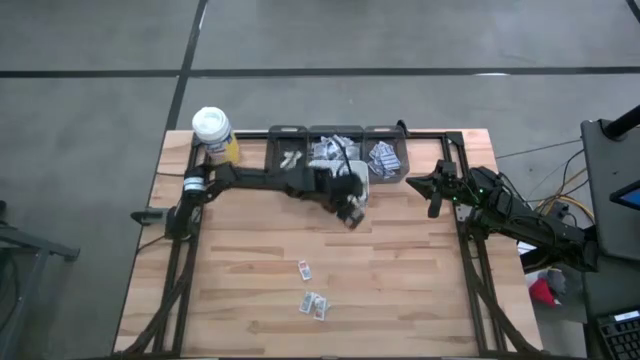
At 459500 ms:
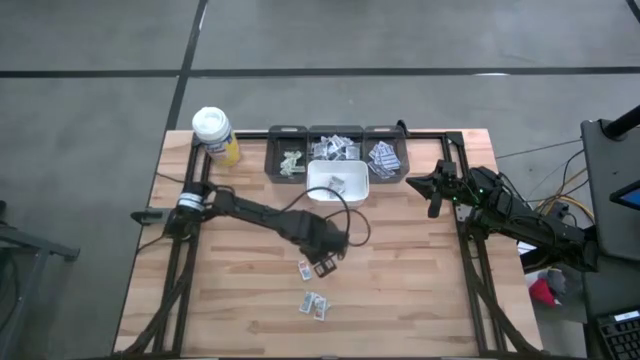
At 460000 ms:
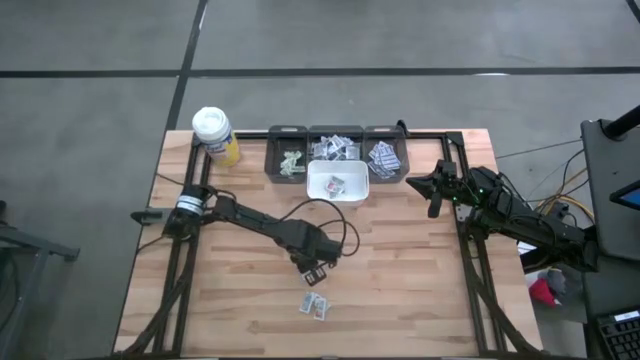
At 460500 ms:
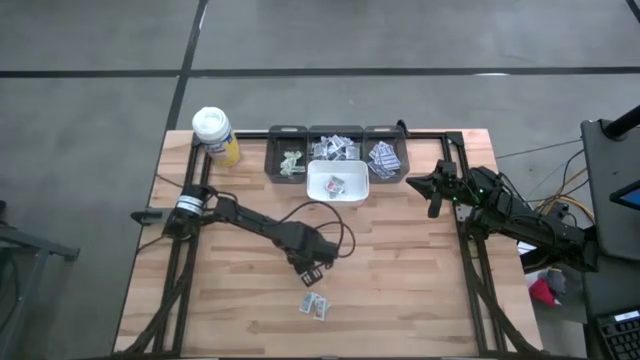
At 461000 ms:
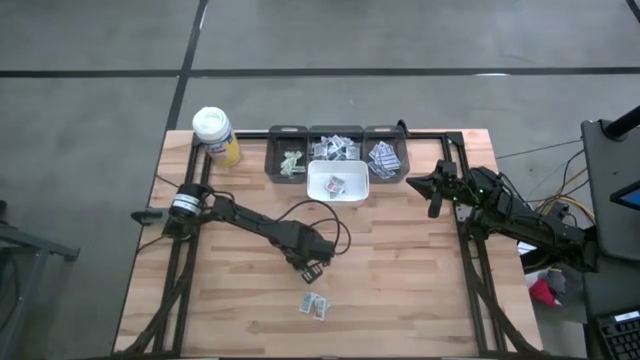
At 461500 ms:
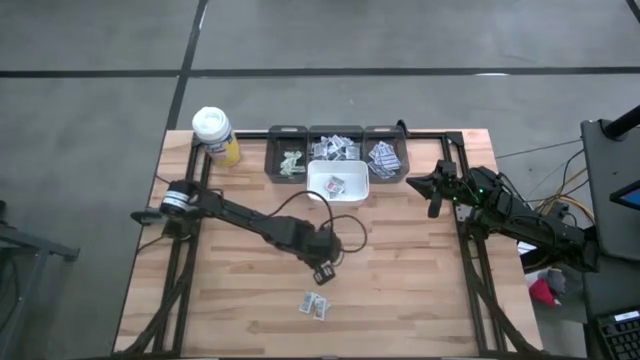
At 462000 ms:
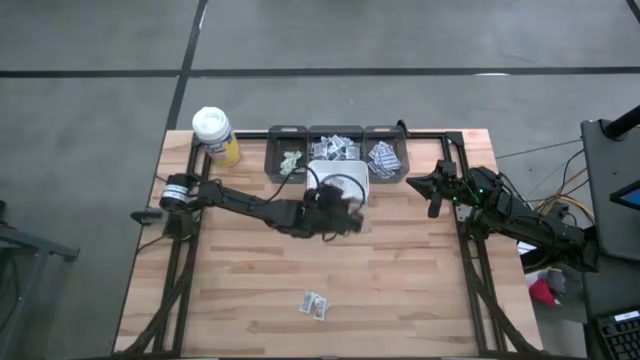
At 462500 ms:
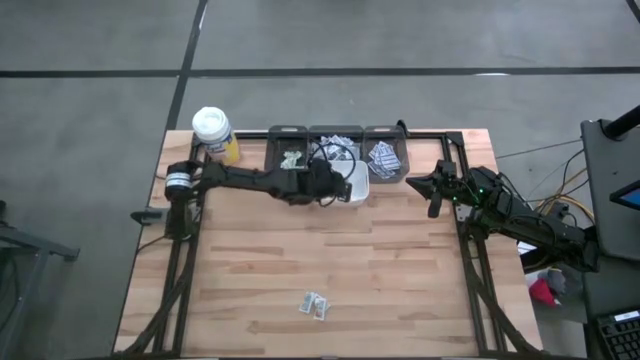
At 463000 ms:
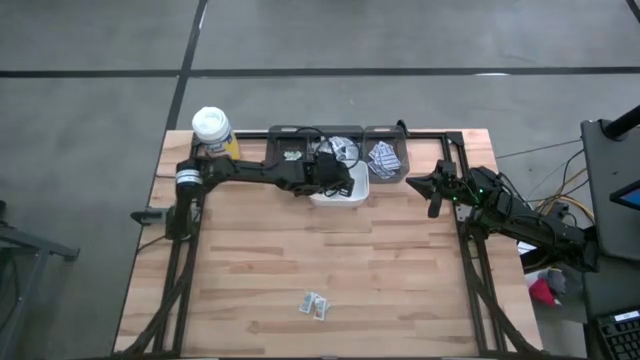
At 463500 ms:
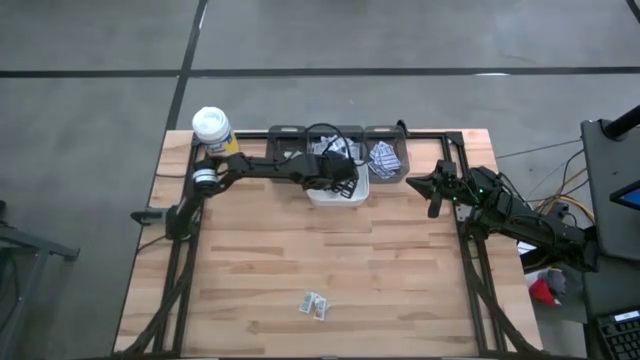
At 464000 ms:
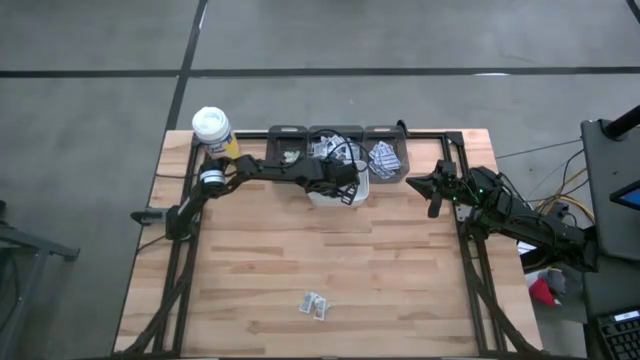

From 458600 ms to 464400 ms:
Task: Pick & Place First Aid Supplies
Put the ointment pack into the white bin

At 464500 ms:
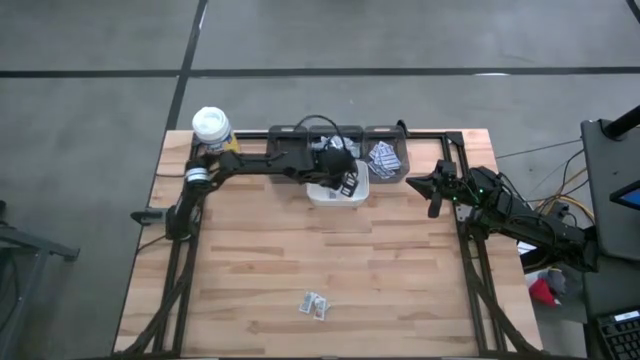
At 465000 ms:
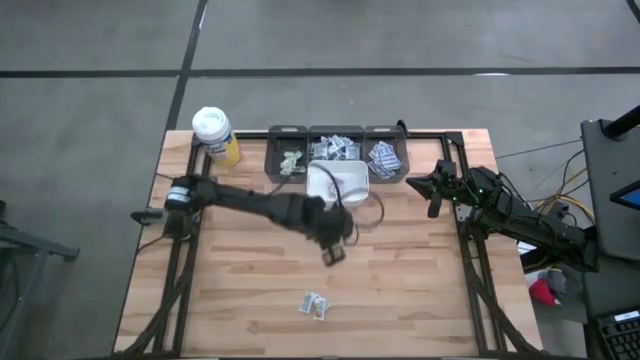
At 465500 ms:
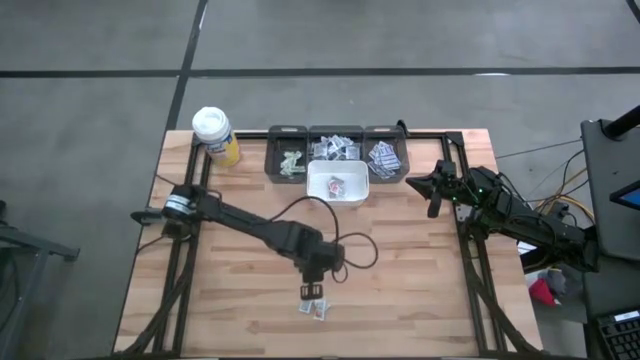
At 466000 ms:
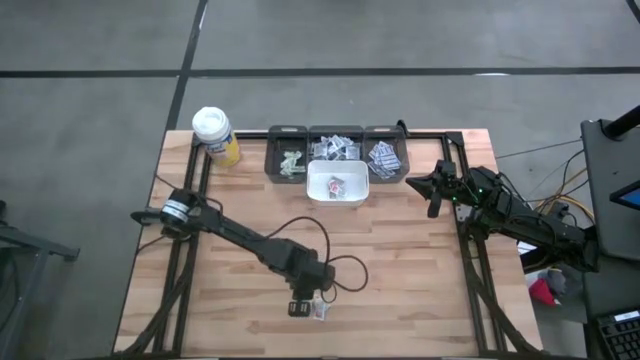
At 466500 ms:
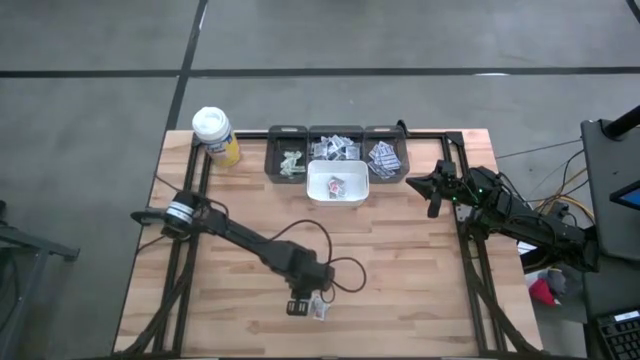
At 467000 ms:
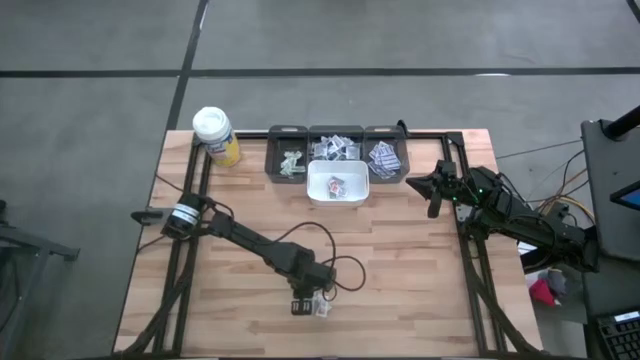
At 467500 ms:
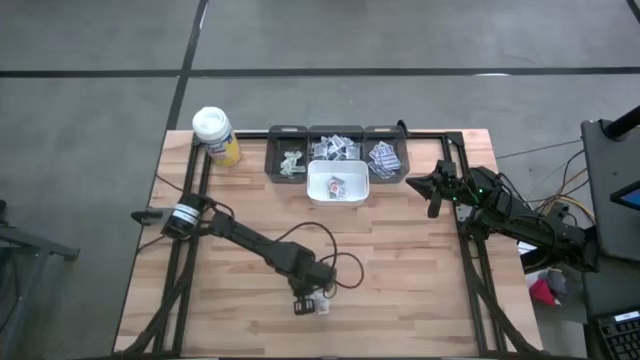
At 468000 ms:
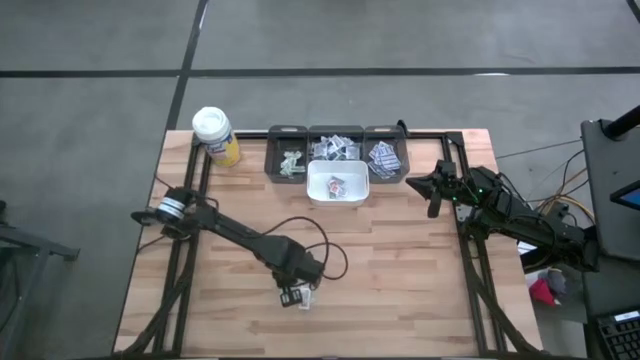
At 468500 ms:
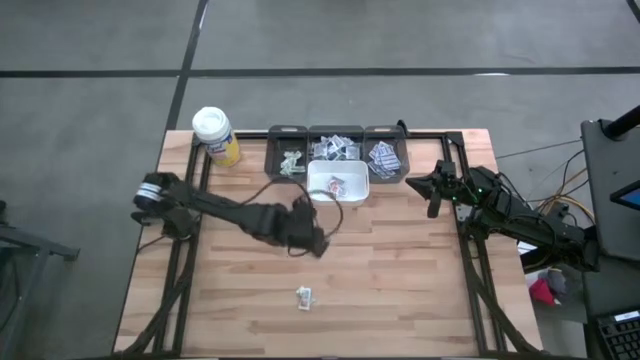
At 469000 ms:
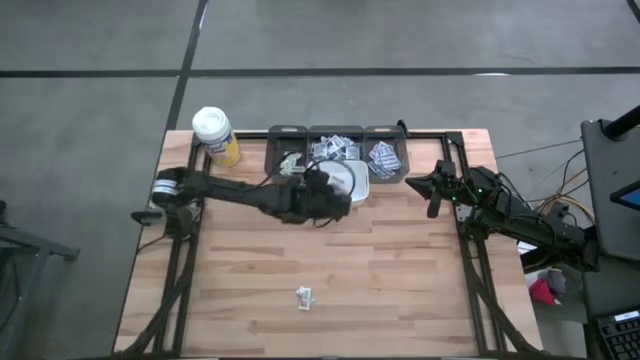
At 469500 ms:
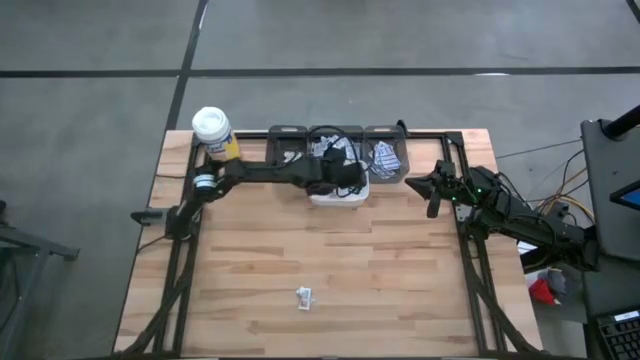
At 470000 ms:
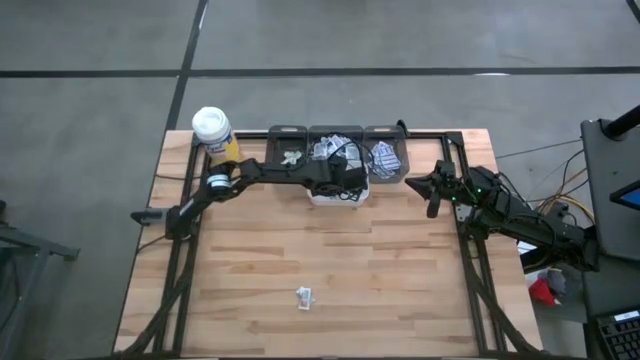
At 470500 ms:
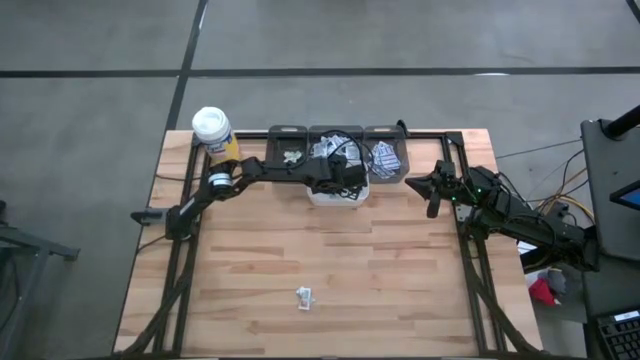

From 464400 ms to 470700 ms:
Put the left ointment pack into the white bin

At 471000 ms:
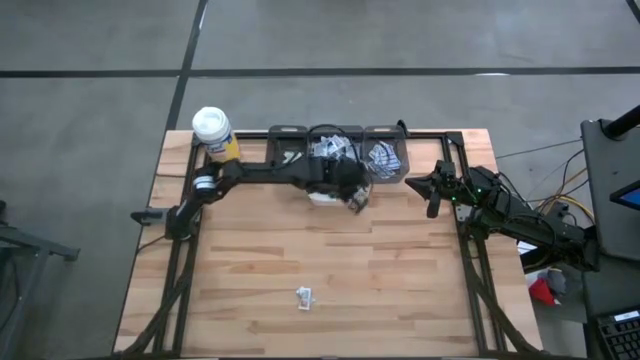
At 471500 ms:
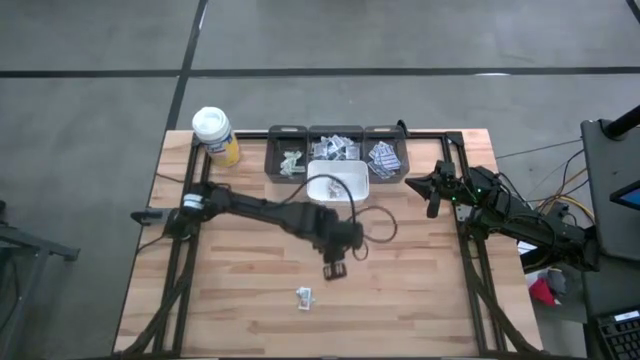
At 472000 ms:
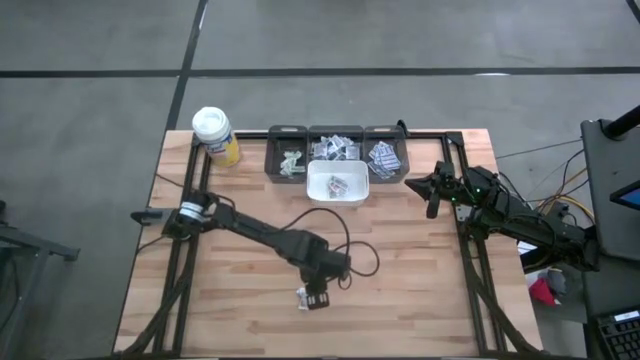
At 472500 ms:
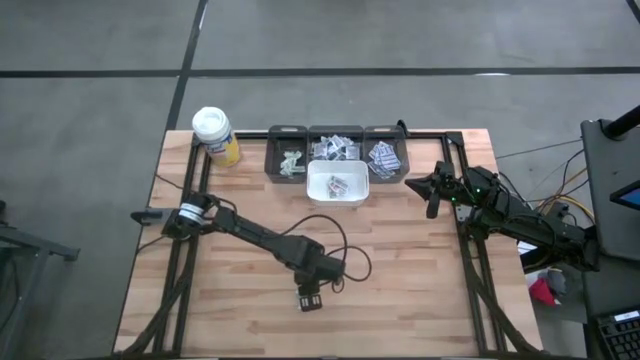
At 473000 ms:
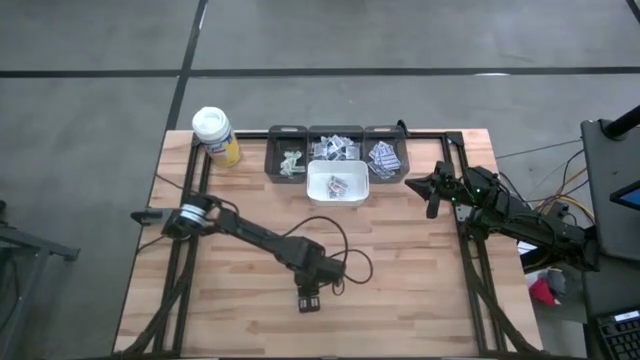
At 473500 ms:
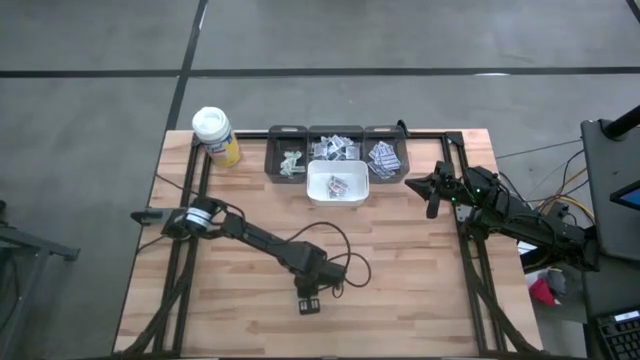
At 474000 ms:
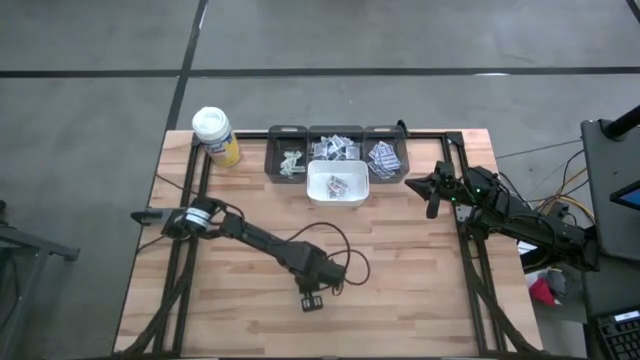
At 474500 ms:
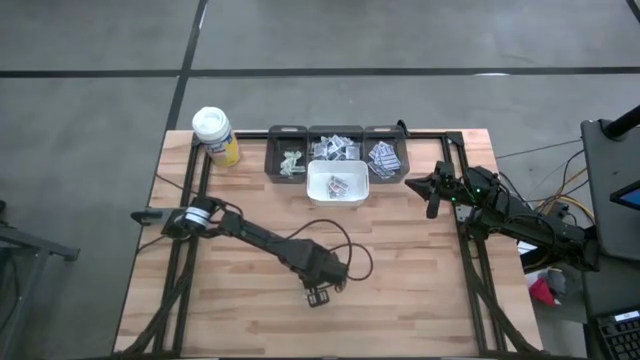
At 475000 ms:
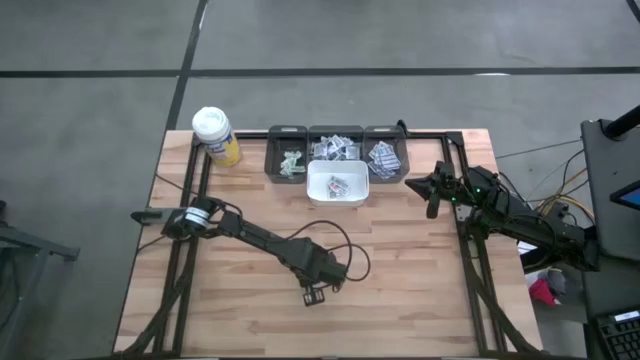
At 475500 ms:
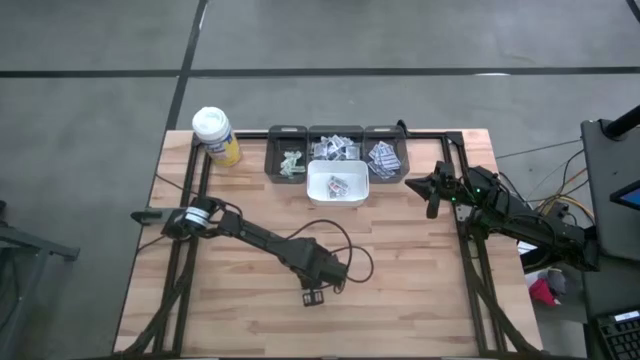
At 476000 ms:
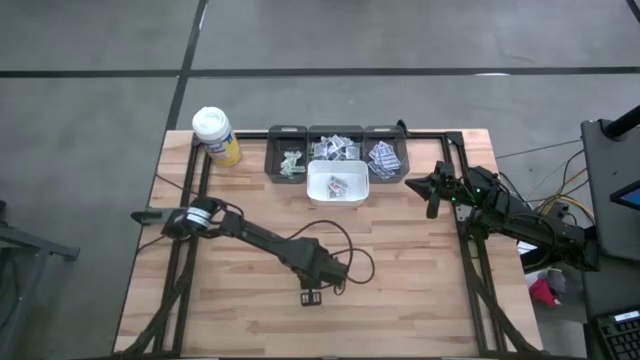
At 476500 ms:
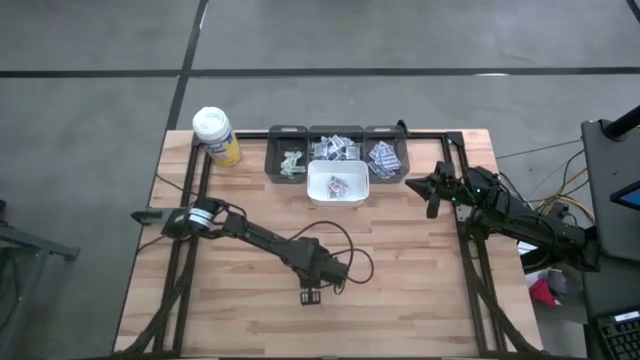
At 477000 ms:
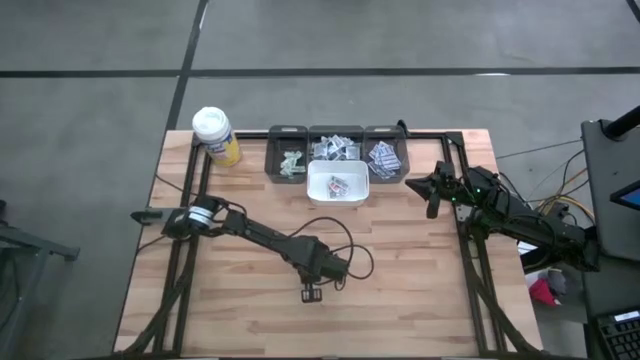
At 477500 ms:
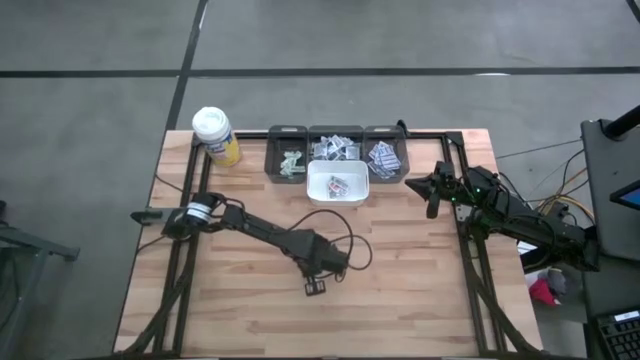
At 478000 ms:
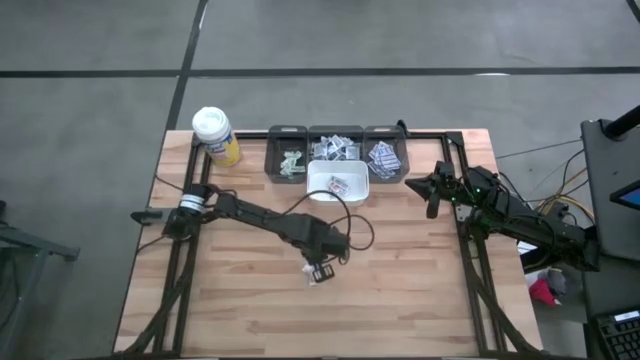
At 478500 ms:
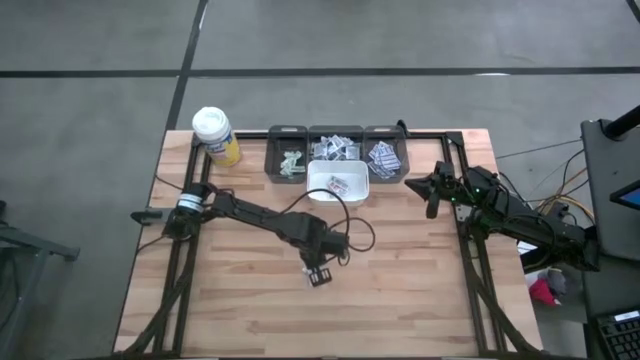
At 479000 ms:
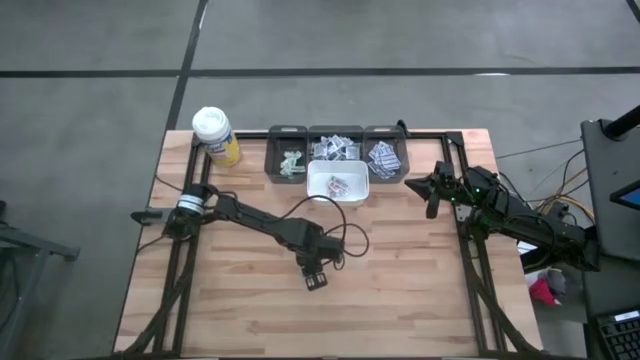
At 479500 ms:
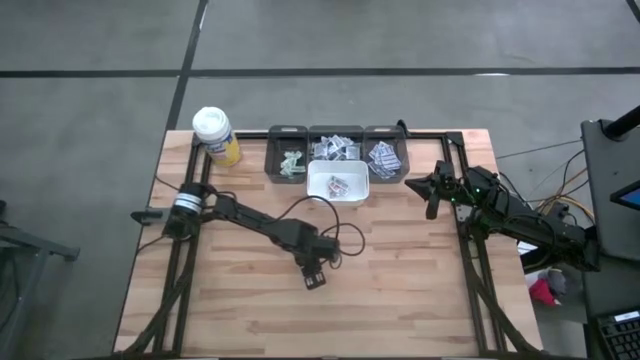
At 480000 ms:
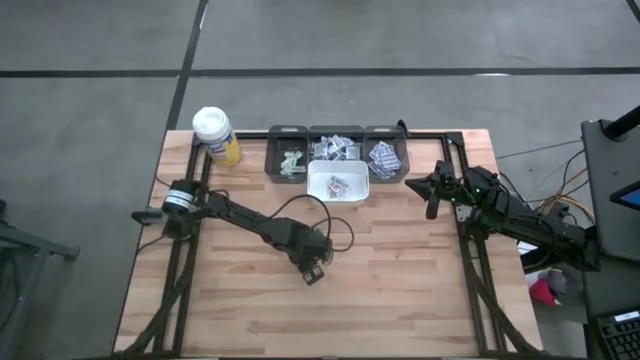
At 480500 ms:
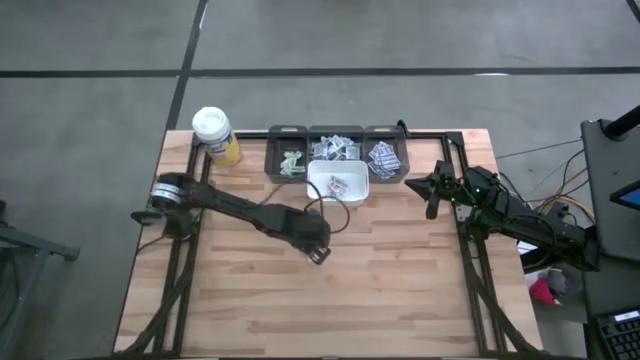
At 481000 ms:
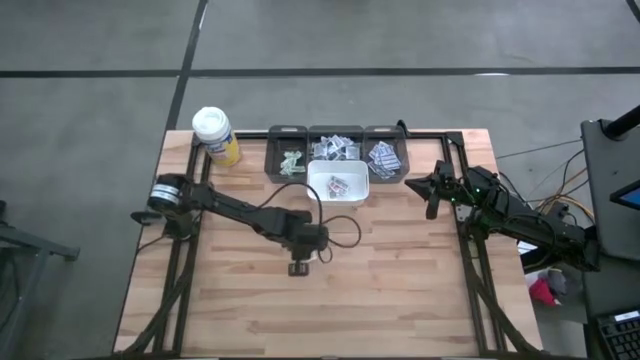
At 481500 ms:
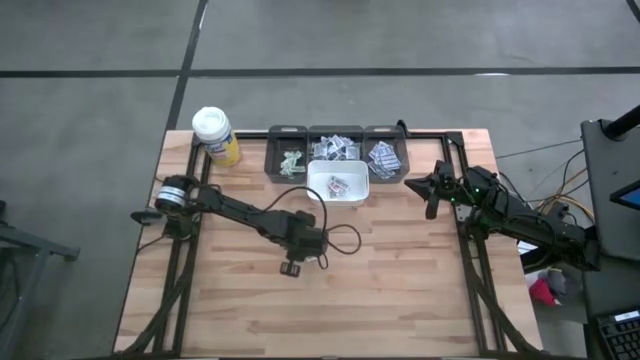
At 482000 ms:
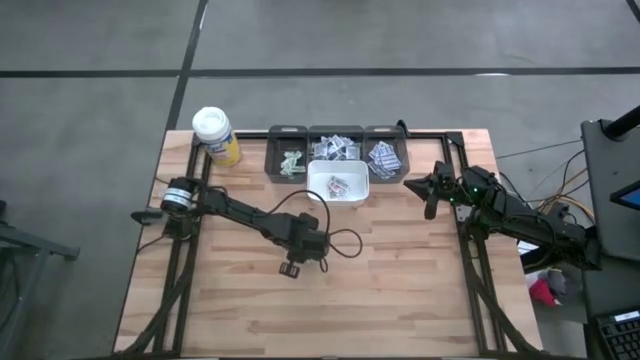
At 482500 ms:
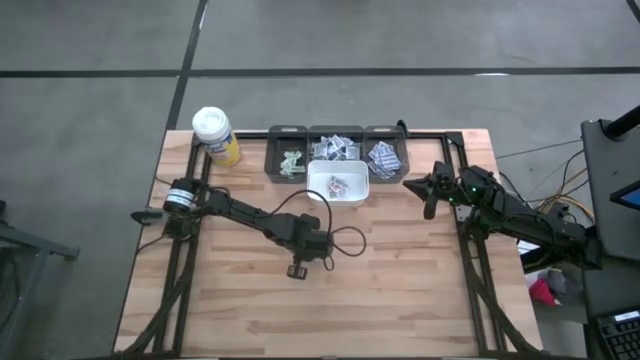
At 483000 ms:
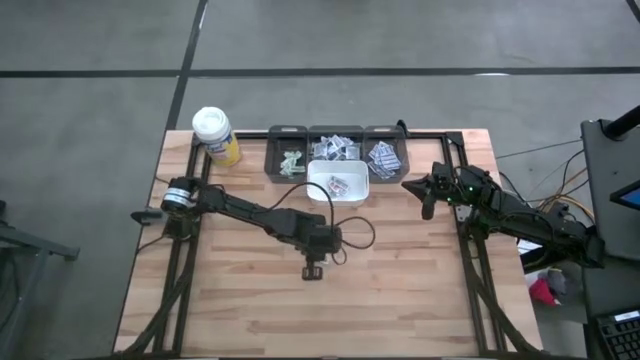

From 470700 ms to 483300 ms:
Put the top ointment pack into the white bin
